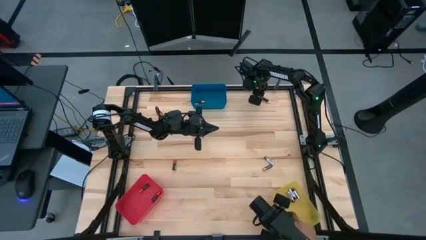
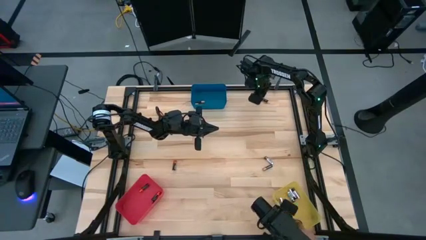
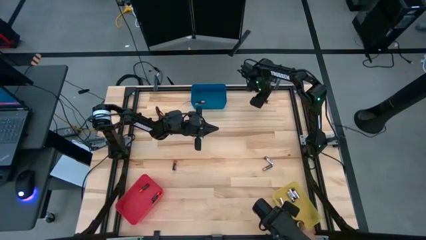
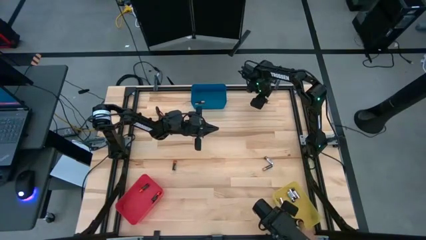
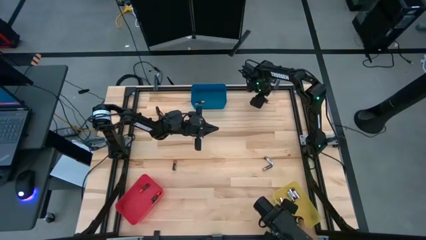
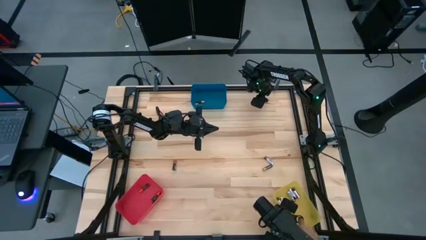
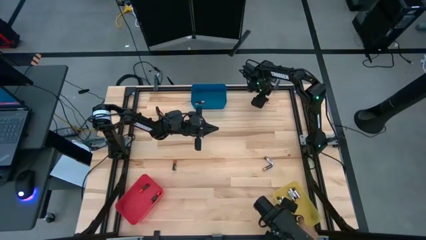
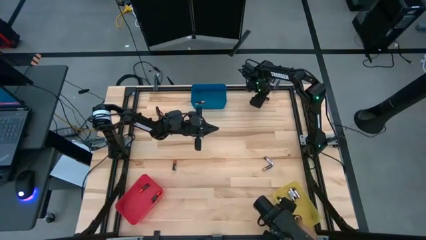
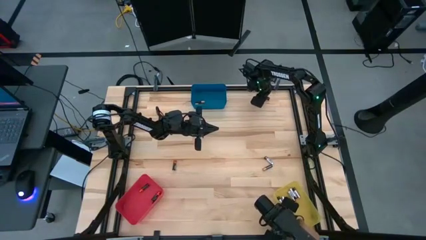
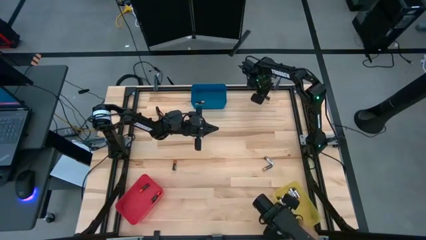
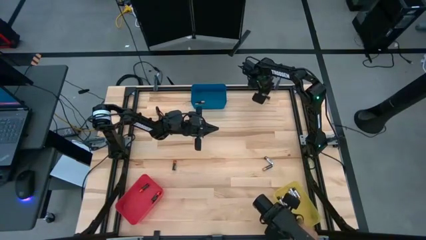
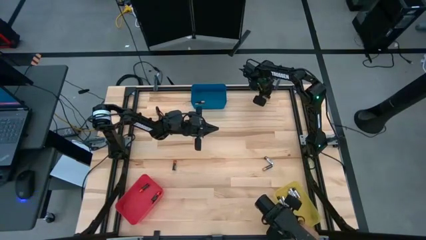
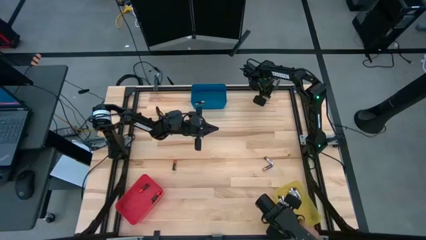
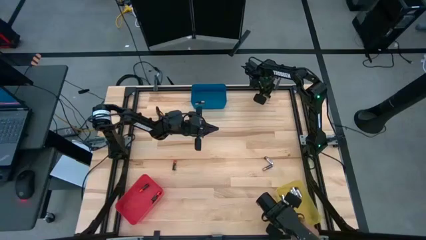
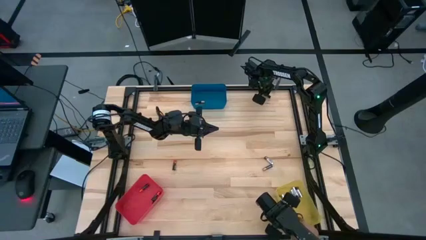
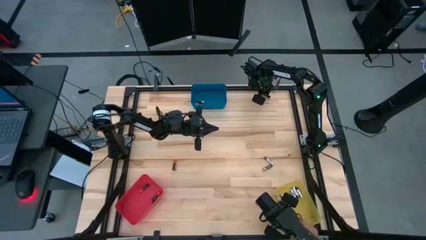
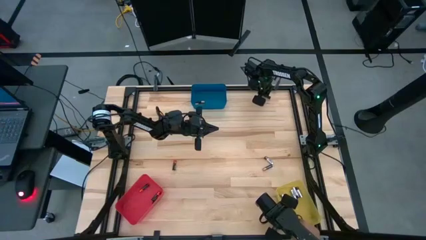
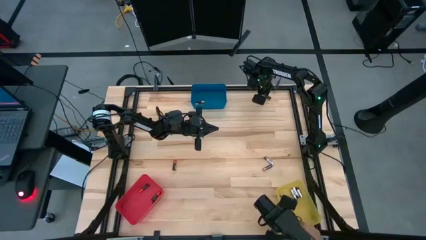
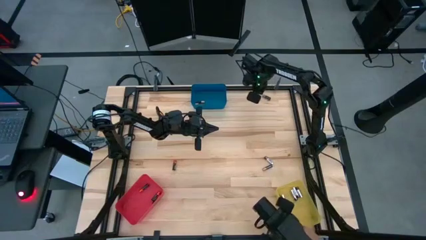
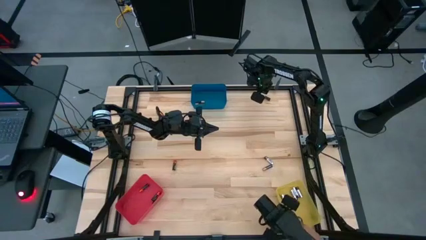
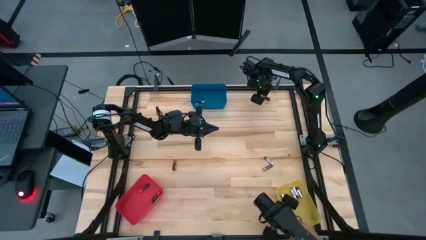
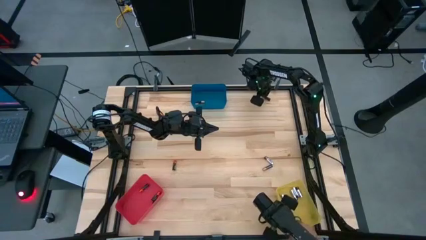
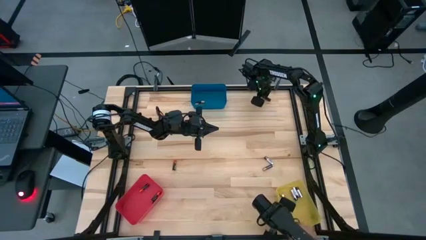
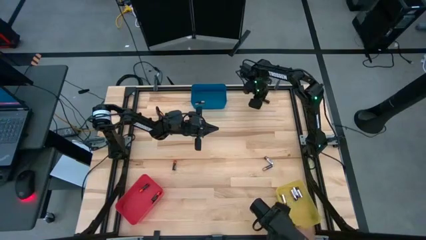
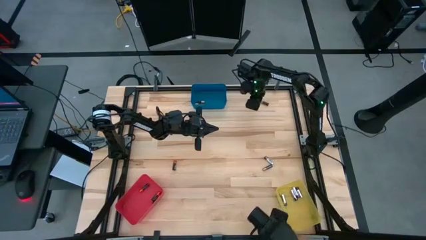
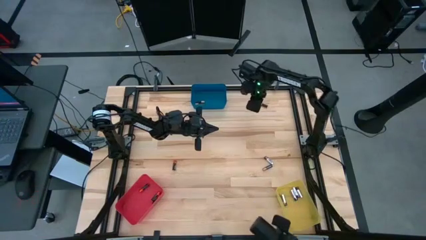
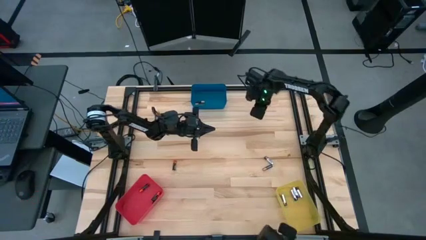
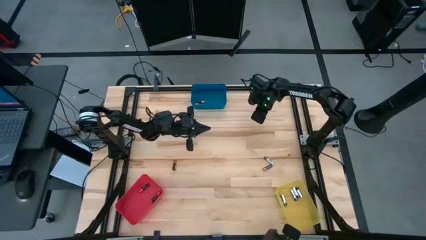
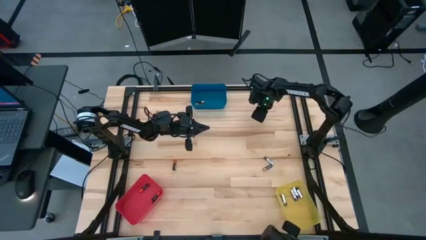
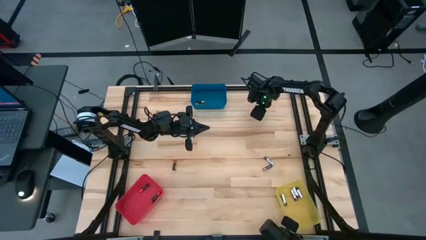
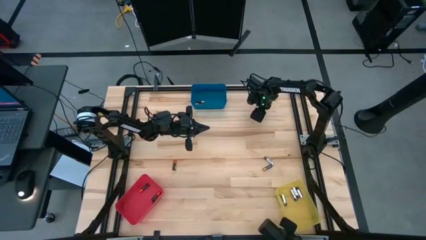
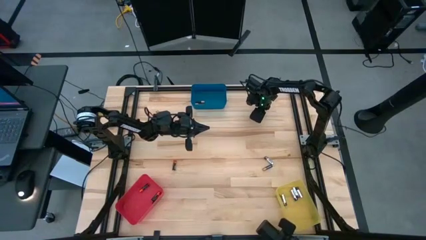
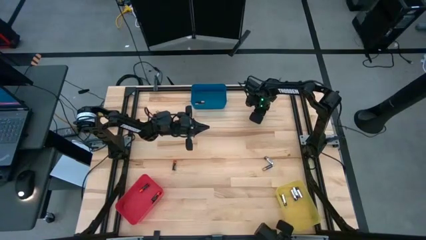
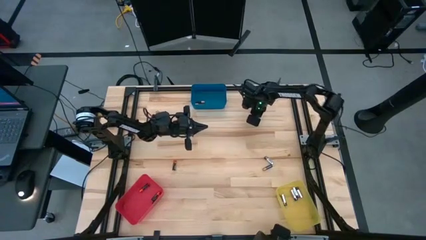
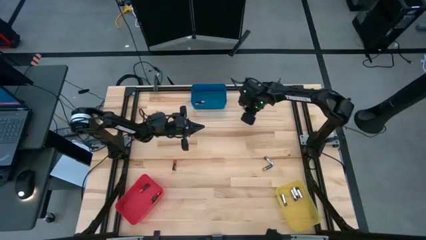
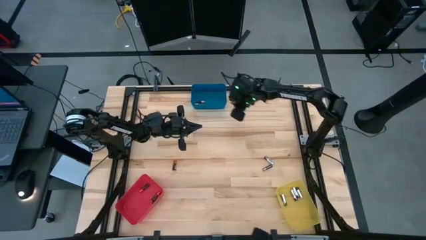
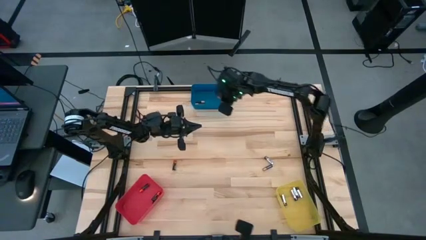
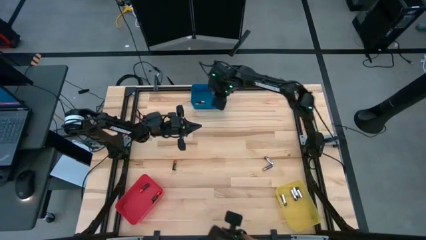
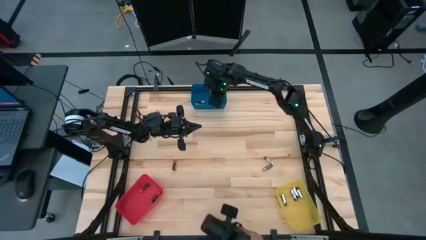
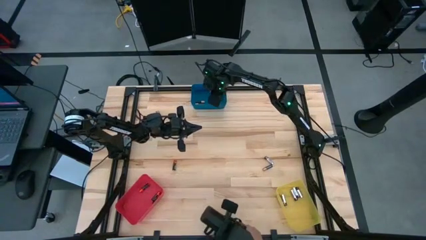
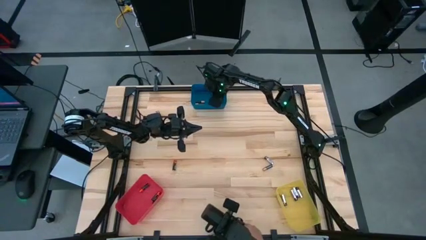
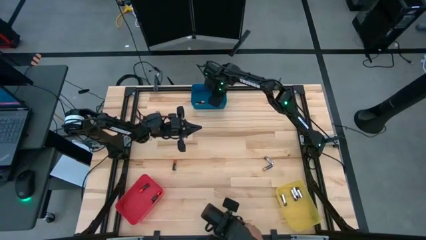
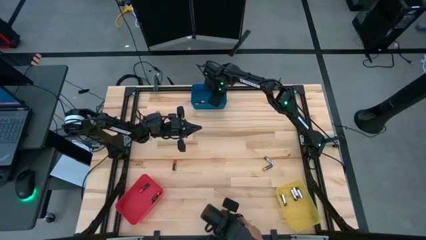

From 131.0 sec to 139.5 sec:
Task: Sort batteries
Put the black-brown battery into the blue bin

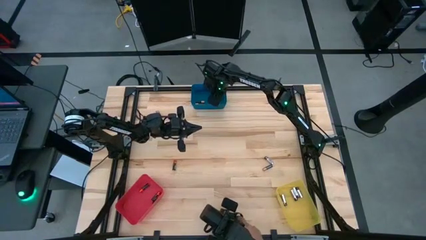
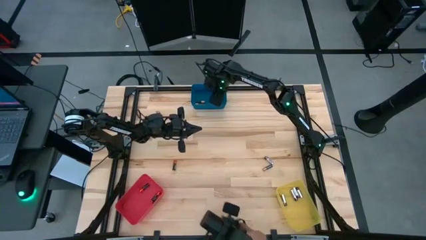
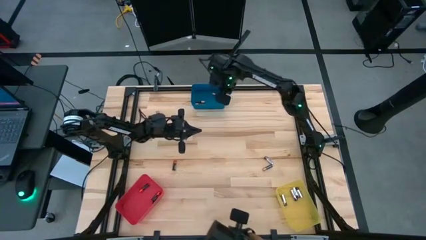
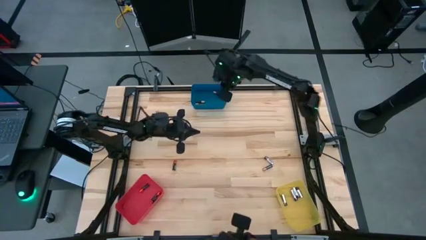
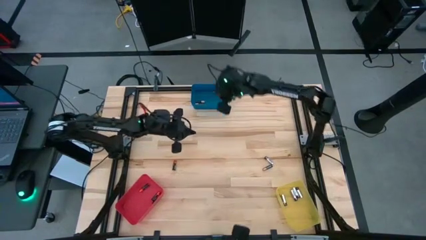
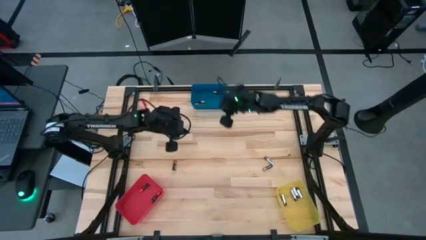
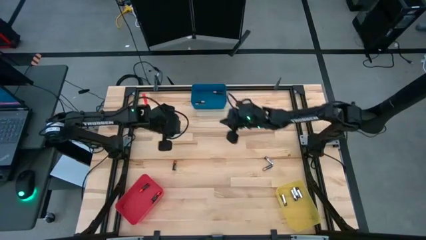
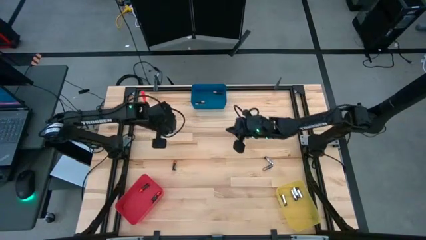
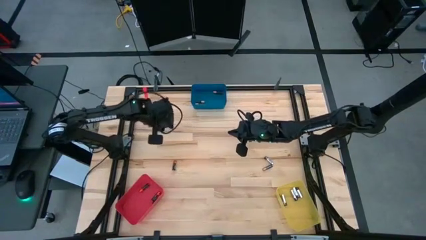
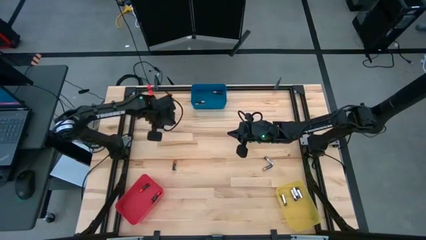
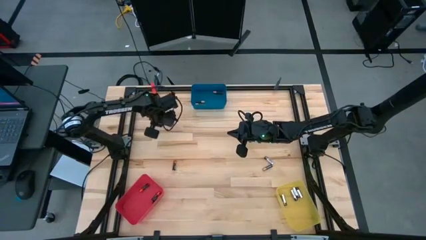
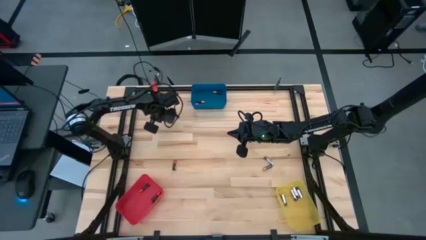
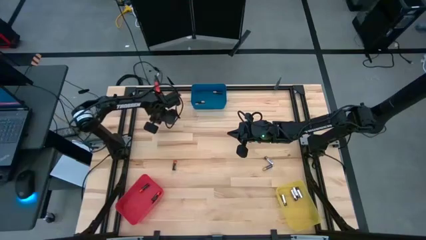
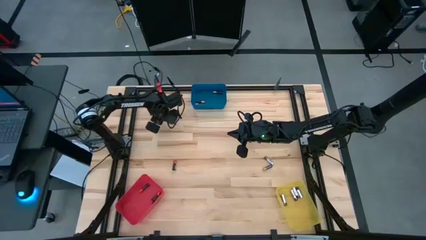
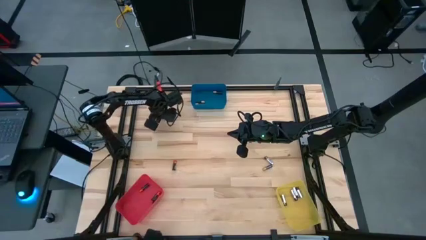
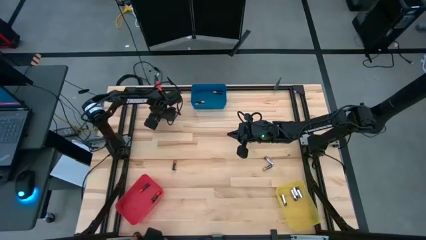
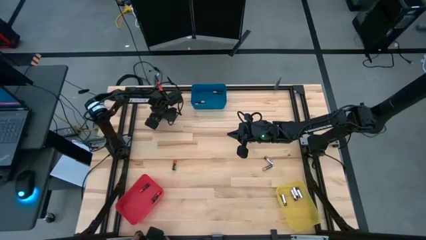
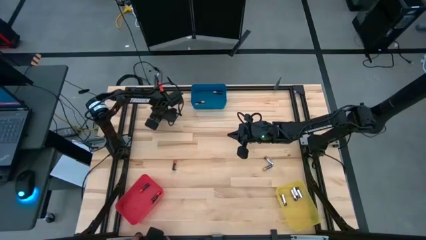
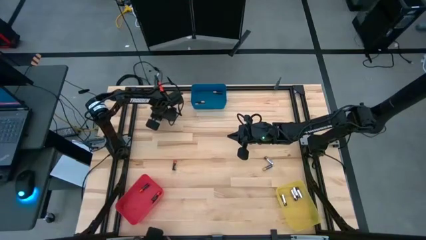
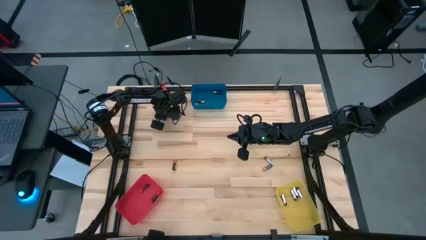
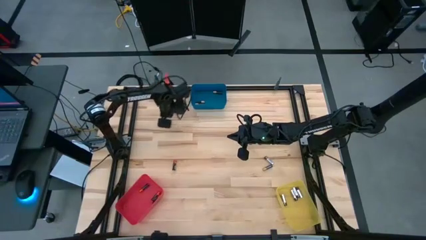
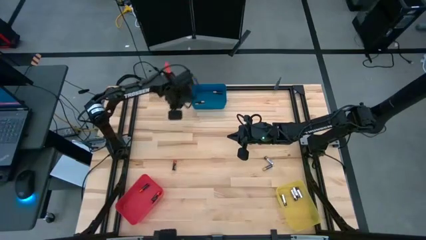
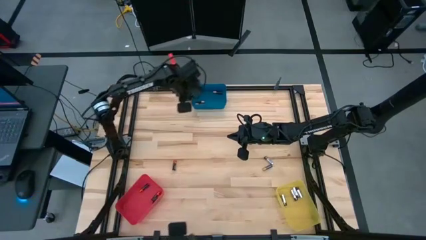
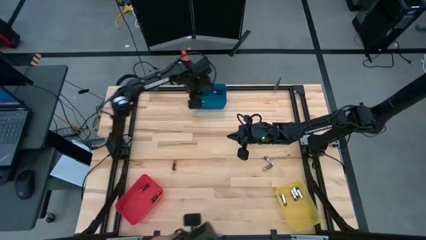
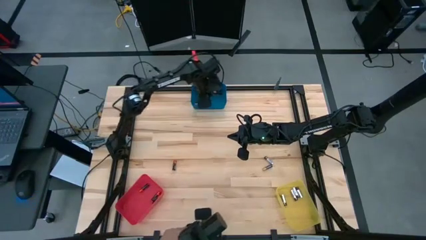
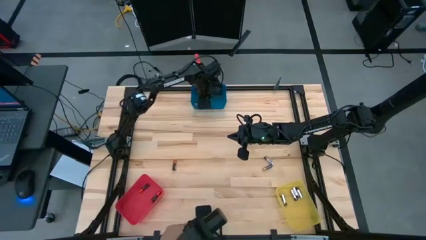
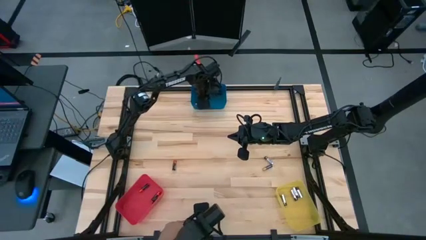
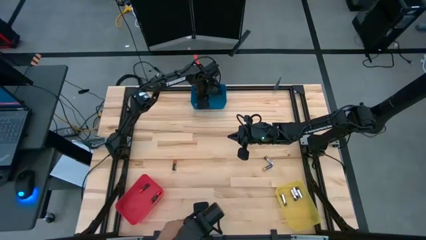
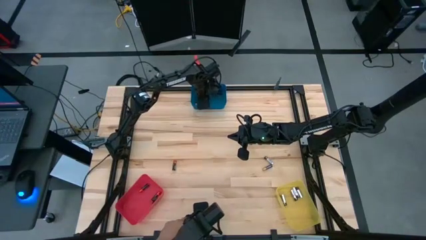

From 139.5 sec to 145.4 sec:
Put the black-brown battery into the blue bin
